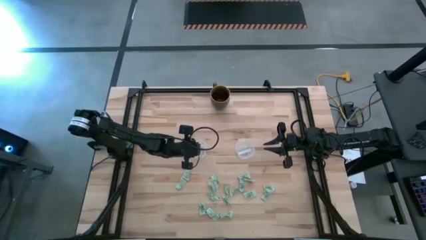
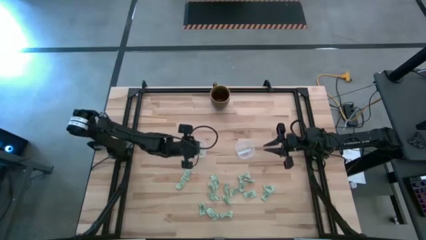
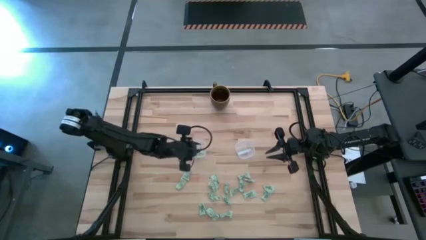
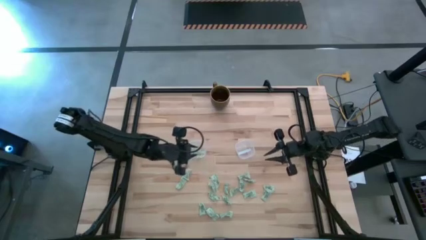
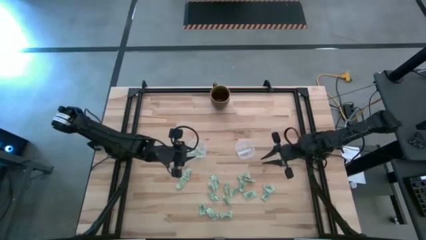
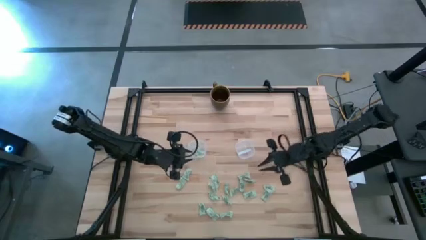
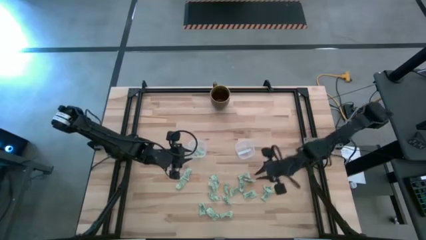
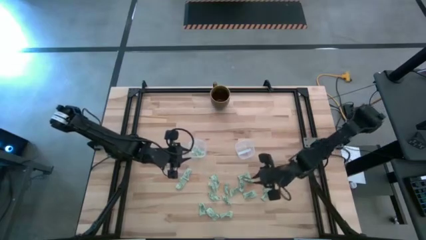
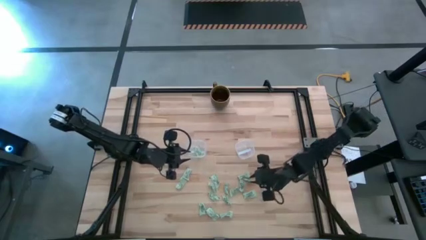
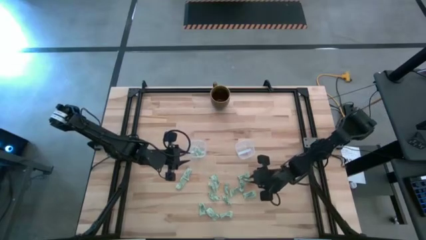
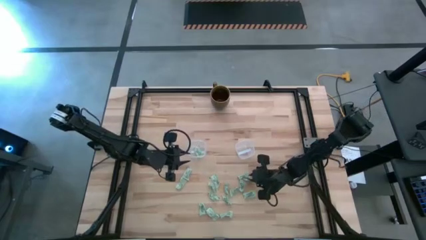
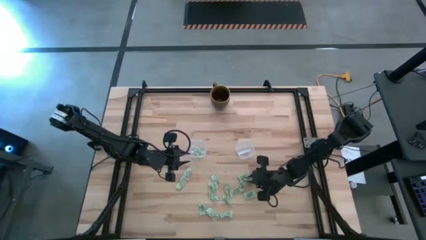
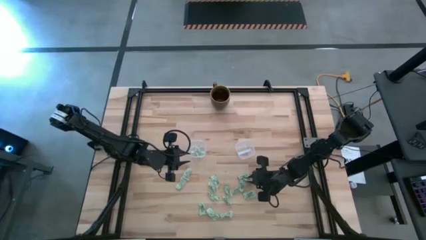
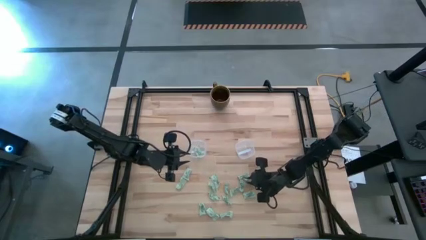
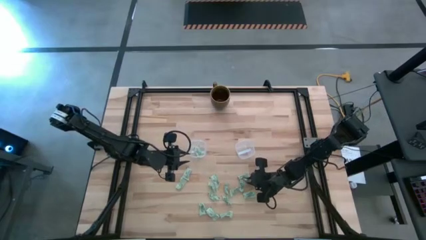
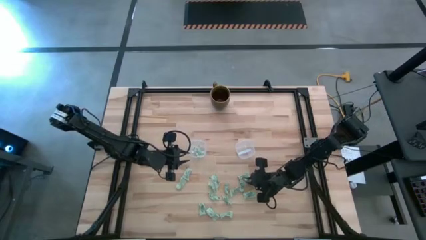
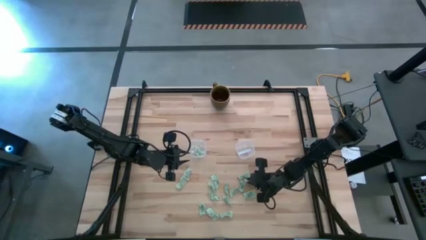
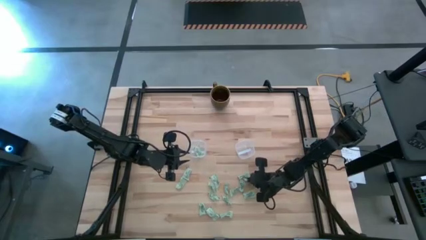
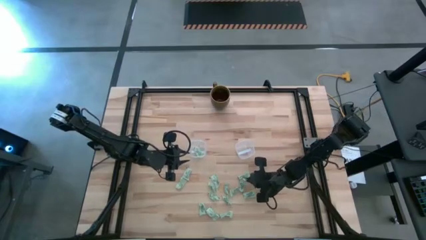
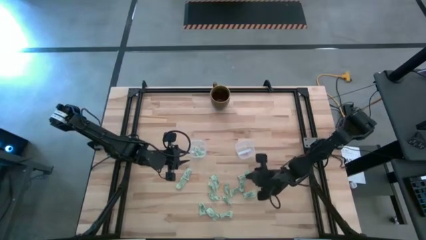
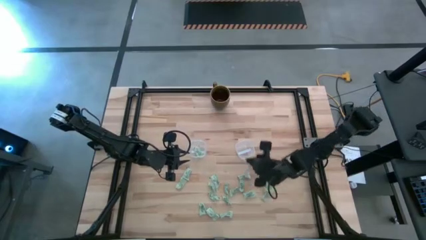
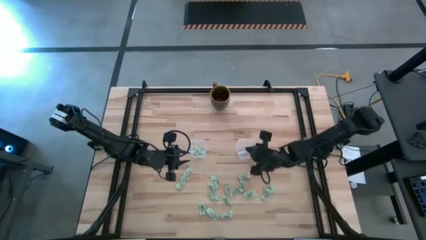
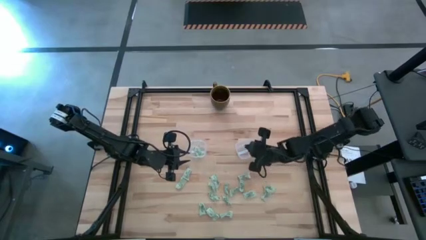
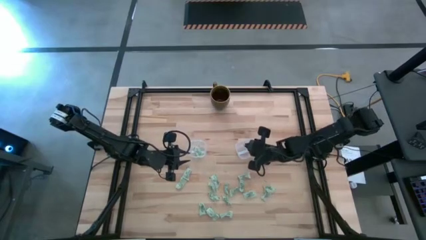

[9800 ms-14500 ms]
Task: Pick and place Stevia / Truvia into bins
Put the white stevia packet into the right transparent container

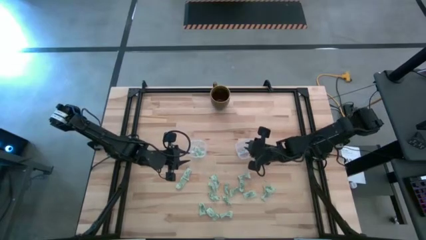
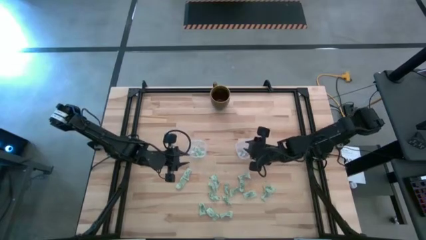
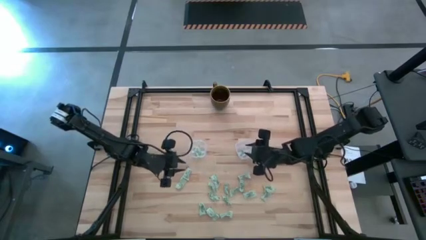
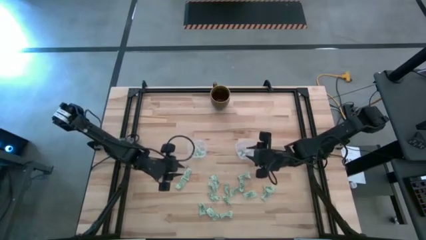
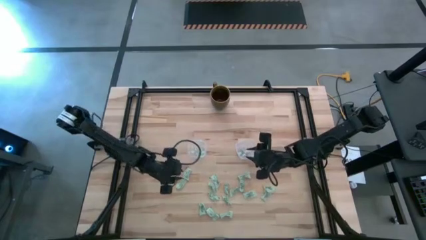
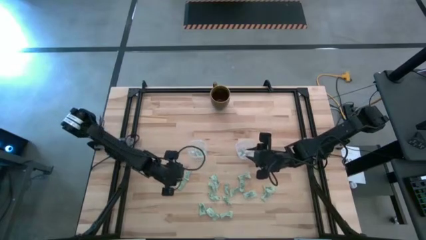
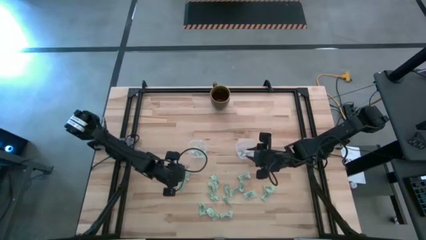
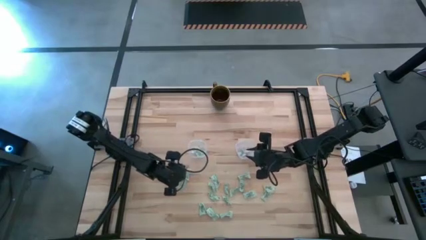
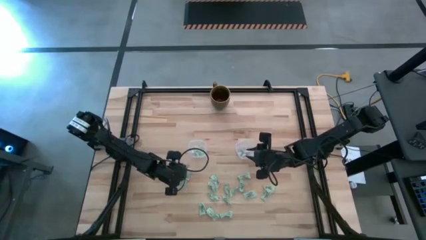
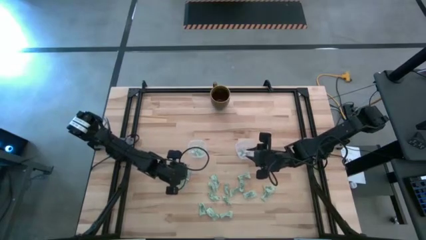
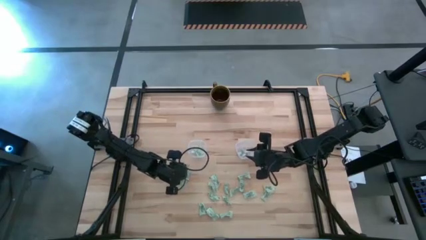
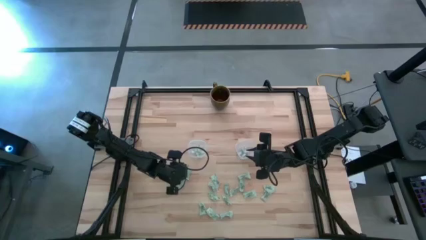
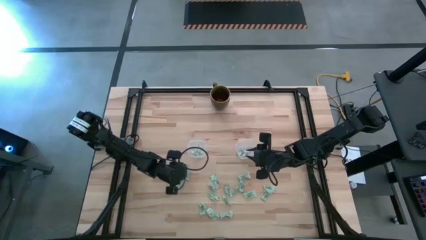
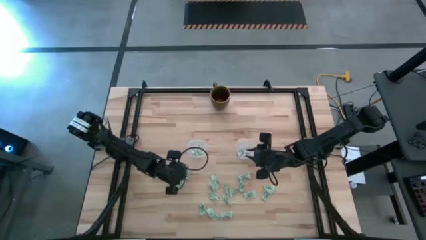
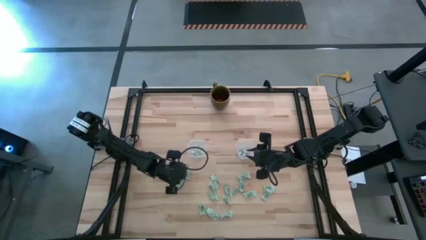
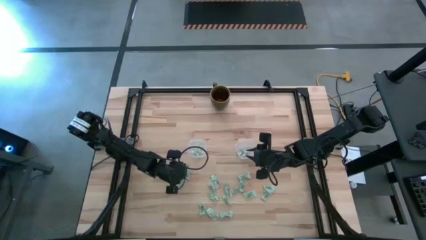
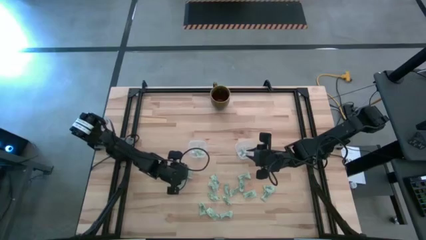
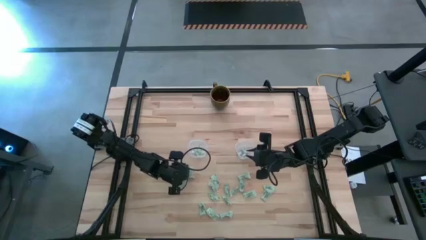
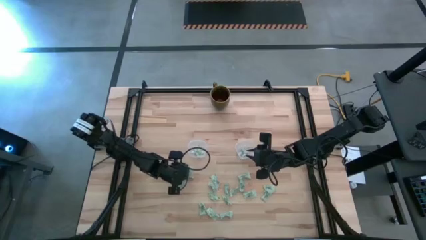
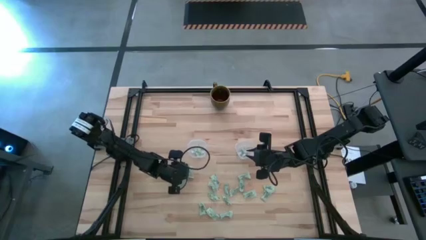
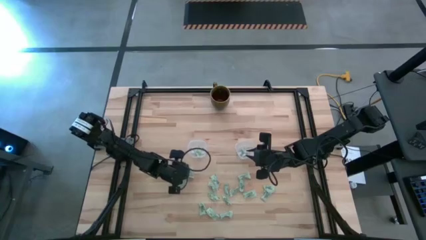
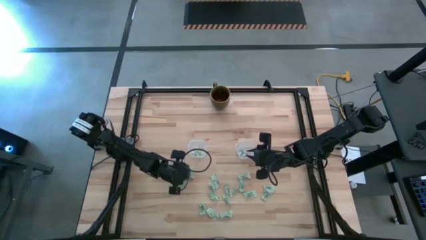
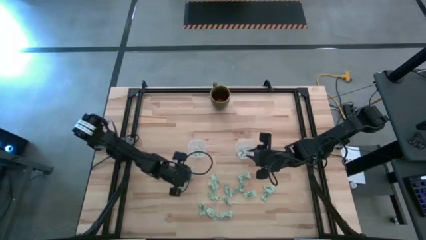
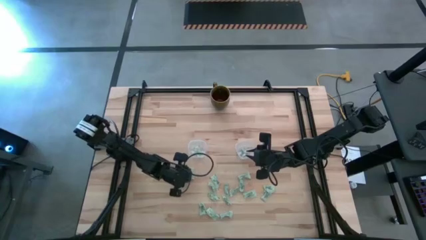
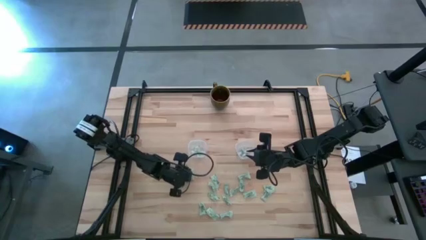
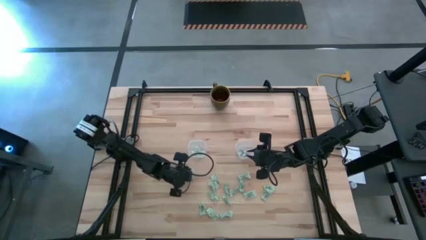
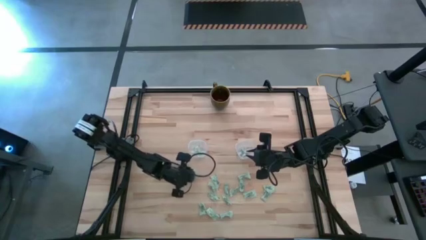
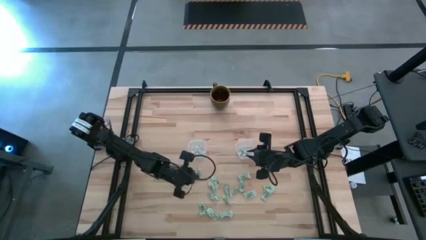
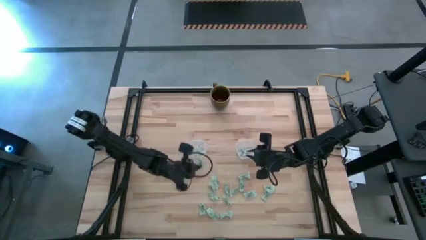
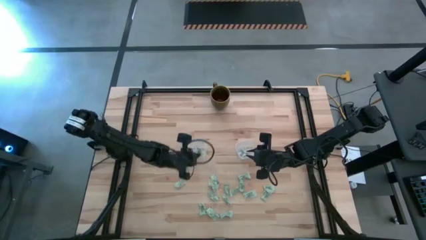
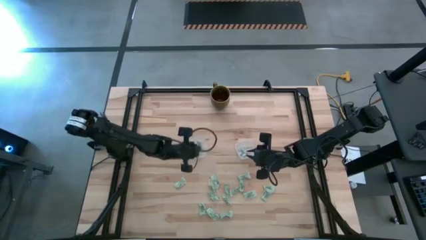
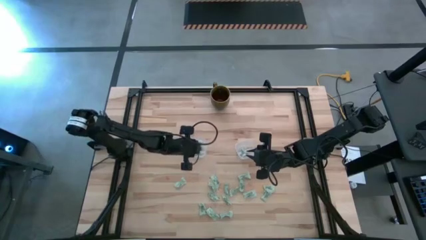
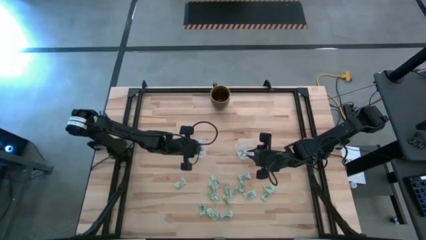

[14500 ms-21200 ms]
Put the white stevia packet into the left transparent container

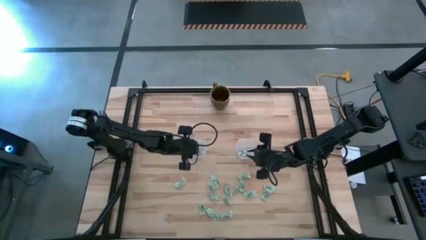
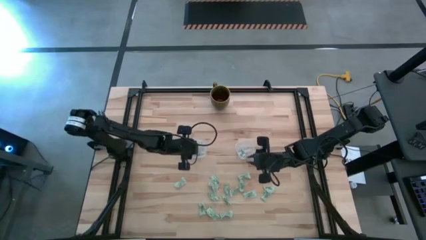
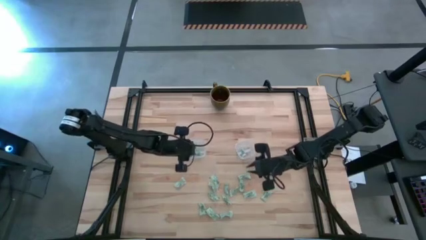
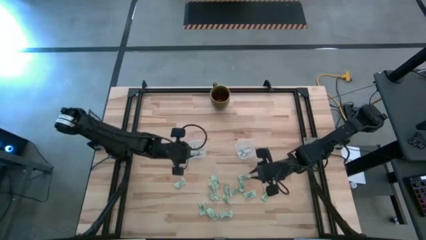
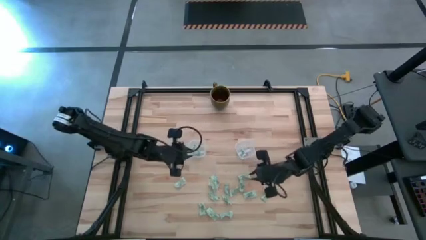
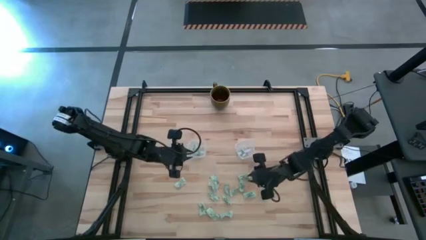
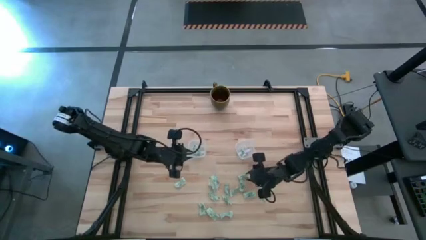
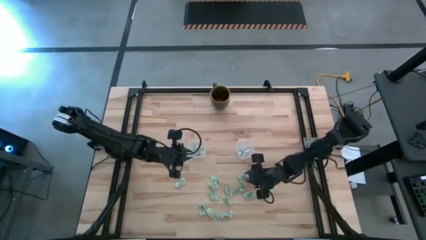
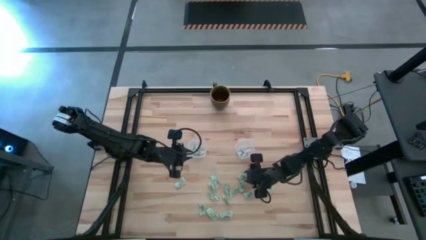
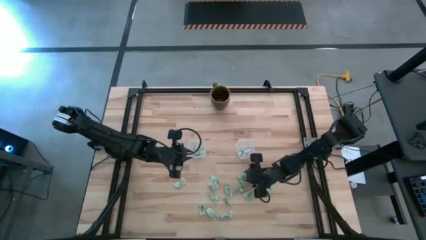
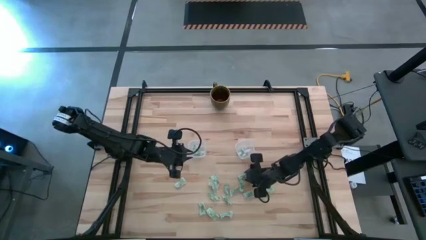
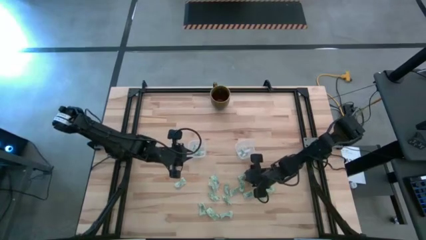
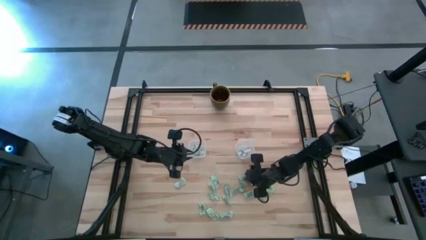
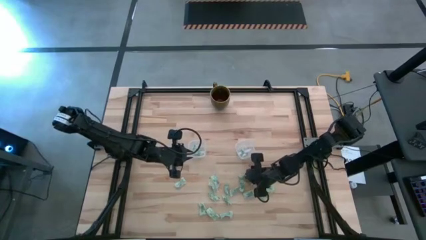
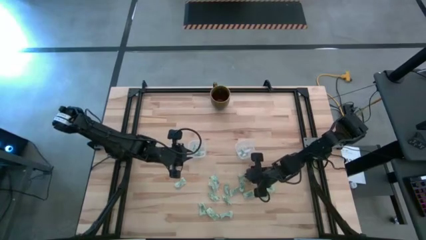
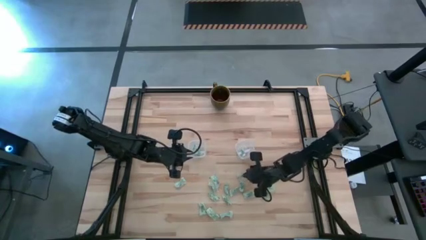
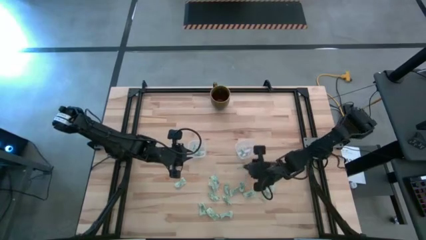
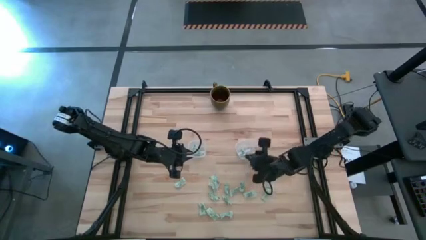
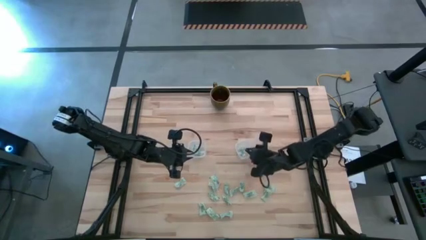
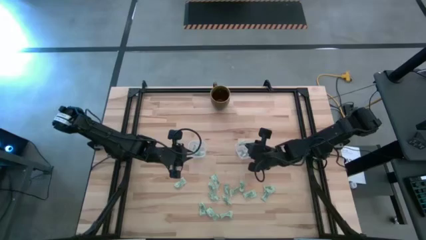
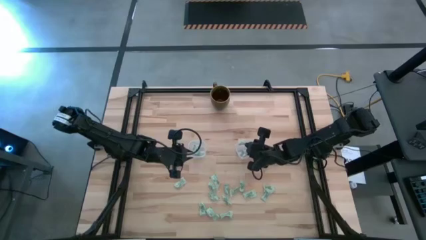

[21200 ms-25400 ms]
Put the white stevia packet into the right transparent container
